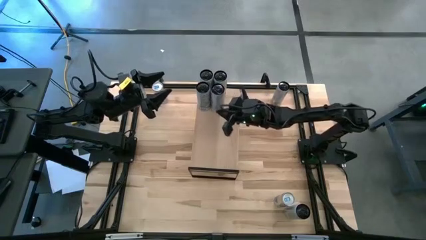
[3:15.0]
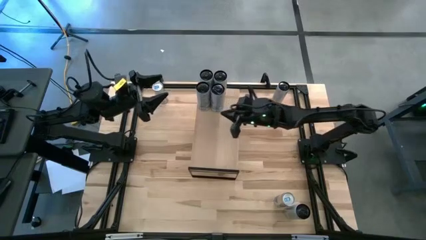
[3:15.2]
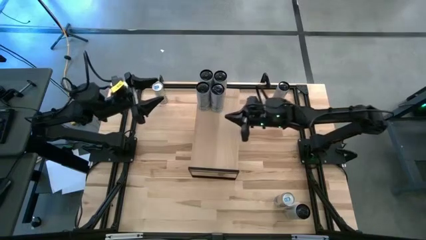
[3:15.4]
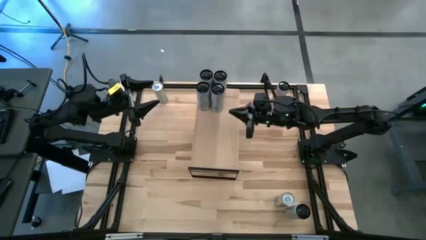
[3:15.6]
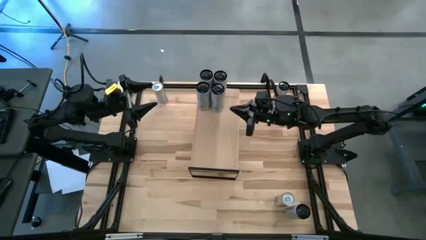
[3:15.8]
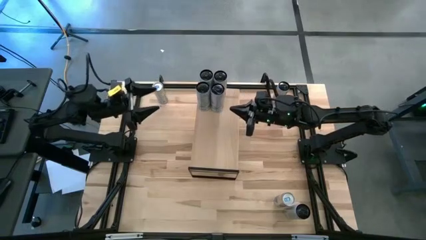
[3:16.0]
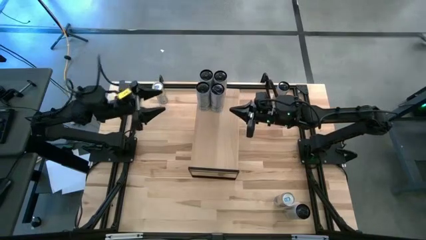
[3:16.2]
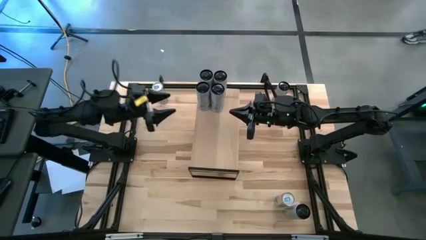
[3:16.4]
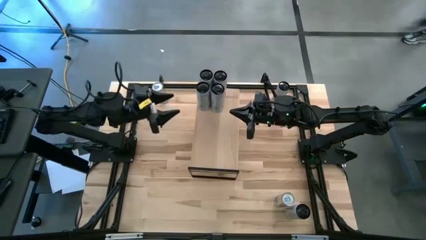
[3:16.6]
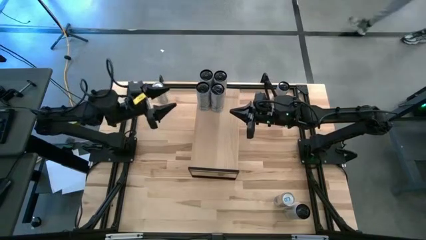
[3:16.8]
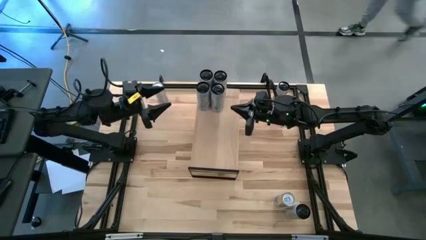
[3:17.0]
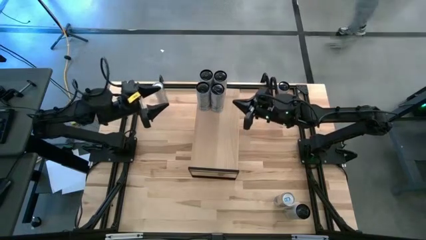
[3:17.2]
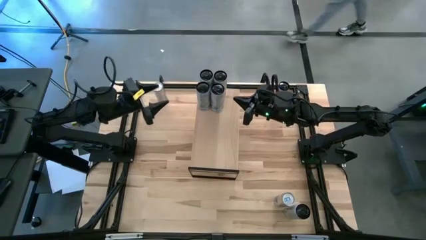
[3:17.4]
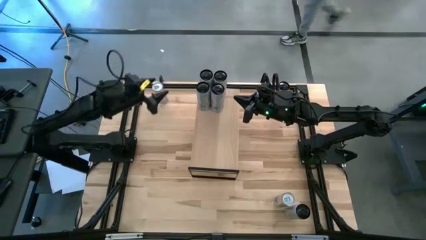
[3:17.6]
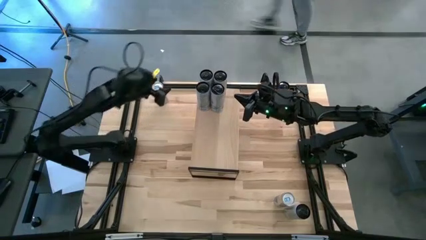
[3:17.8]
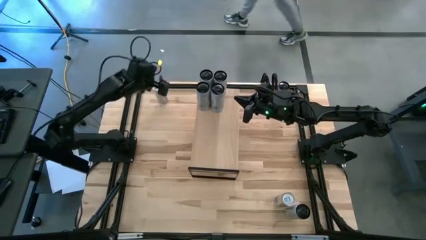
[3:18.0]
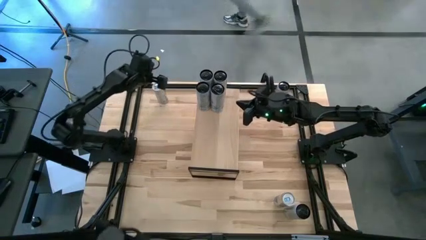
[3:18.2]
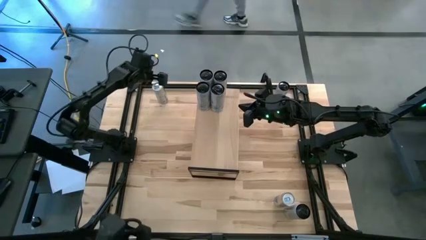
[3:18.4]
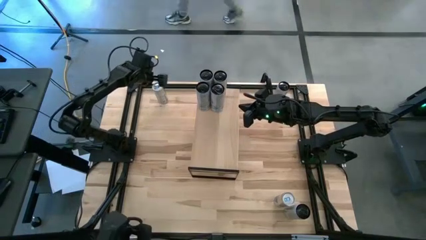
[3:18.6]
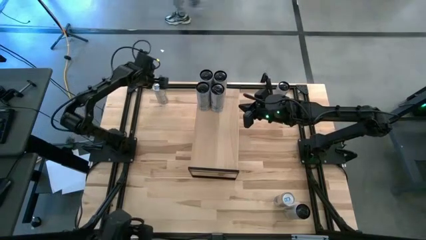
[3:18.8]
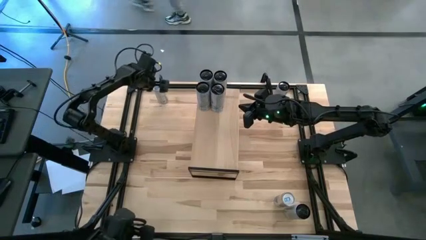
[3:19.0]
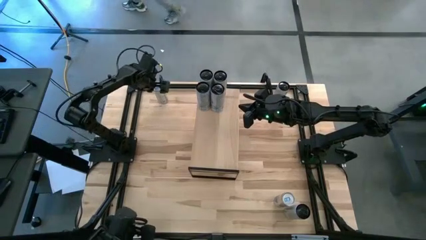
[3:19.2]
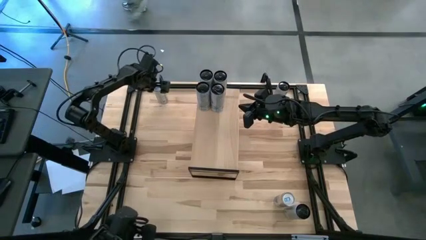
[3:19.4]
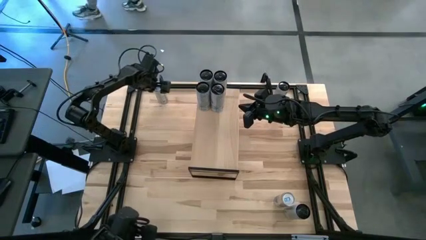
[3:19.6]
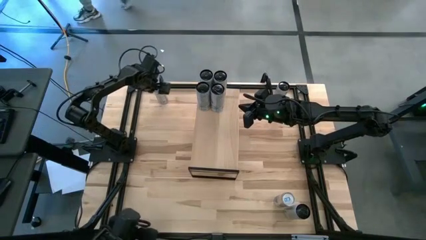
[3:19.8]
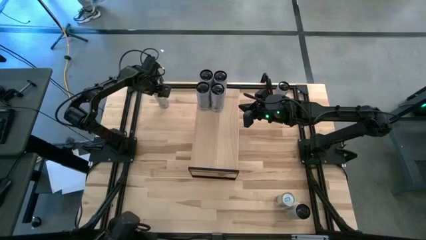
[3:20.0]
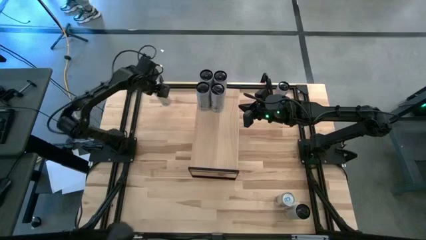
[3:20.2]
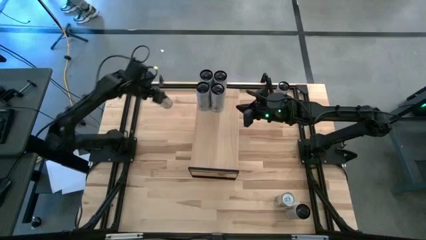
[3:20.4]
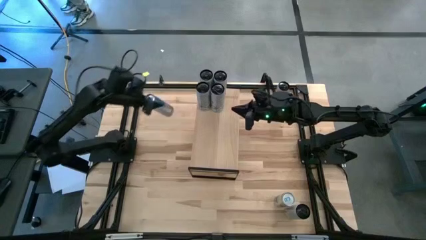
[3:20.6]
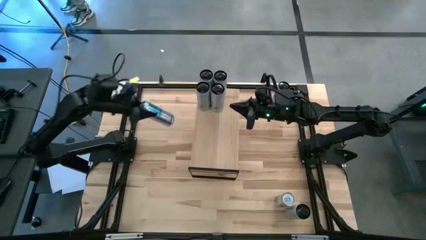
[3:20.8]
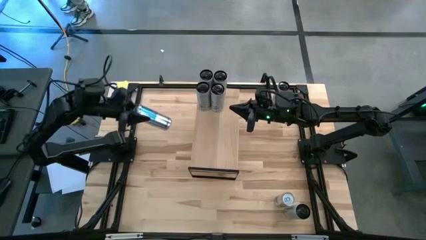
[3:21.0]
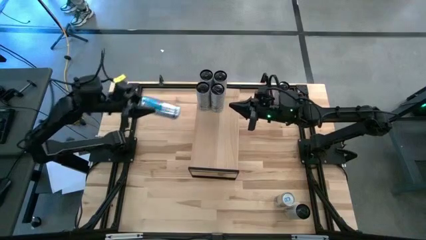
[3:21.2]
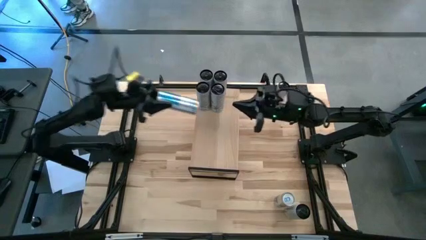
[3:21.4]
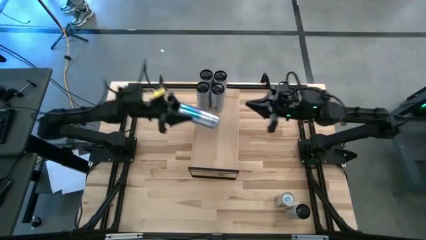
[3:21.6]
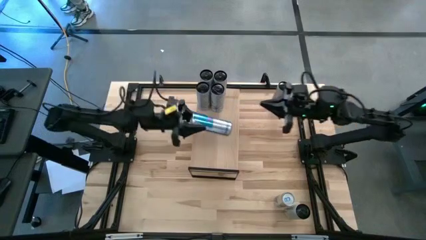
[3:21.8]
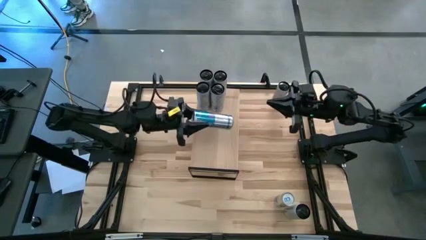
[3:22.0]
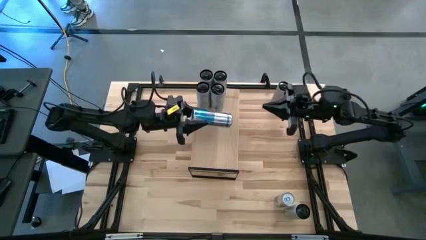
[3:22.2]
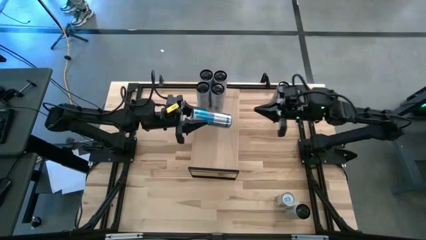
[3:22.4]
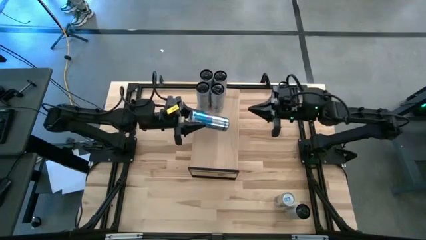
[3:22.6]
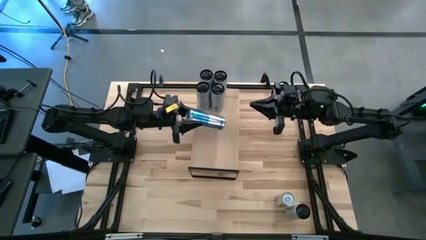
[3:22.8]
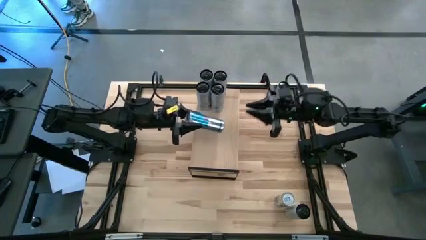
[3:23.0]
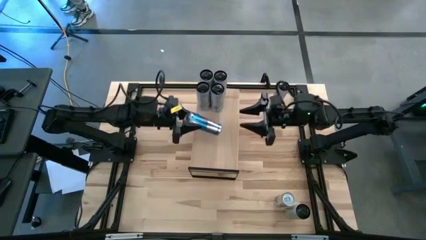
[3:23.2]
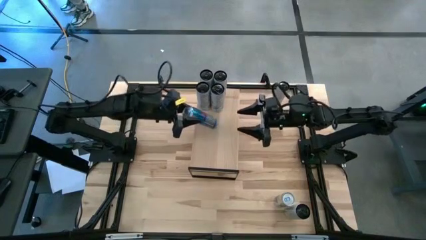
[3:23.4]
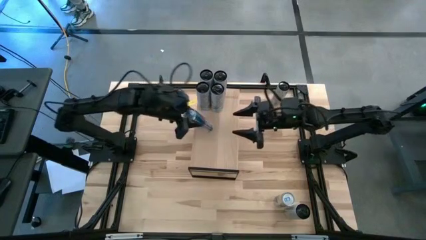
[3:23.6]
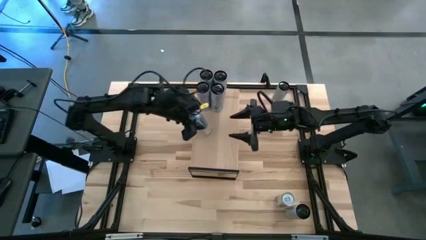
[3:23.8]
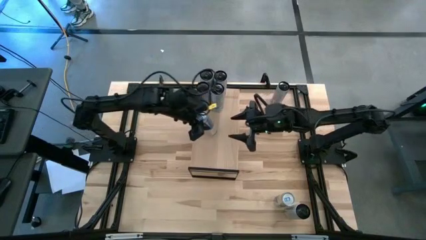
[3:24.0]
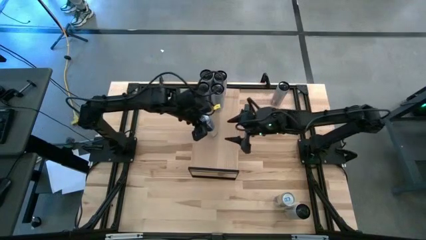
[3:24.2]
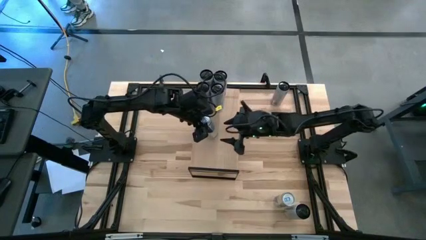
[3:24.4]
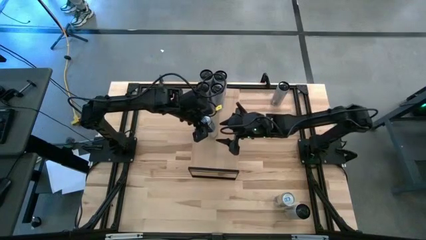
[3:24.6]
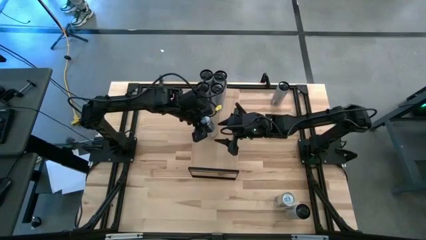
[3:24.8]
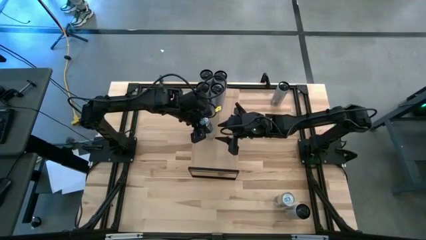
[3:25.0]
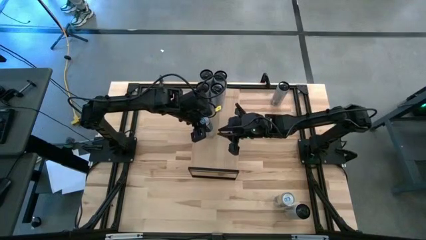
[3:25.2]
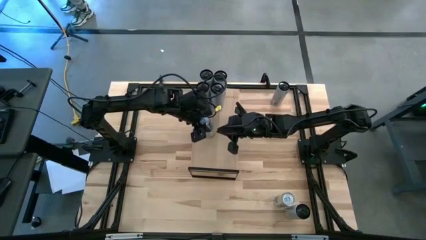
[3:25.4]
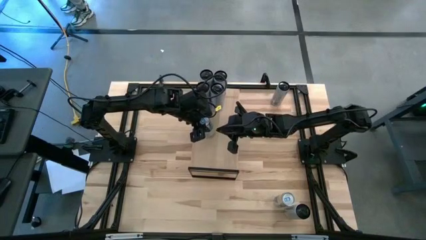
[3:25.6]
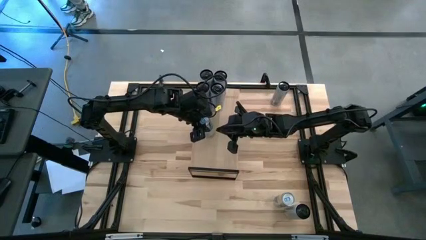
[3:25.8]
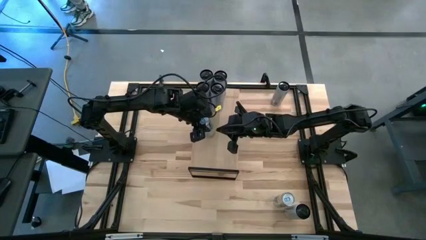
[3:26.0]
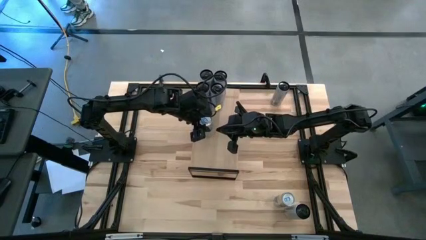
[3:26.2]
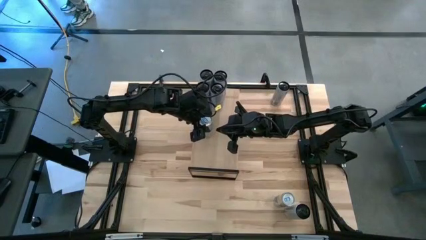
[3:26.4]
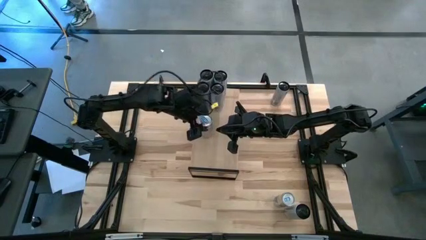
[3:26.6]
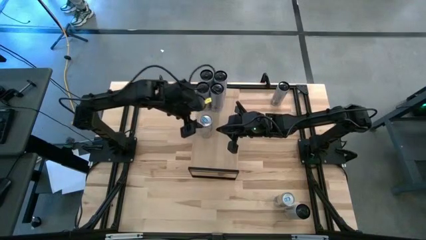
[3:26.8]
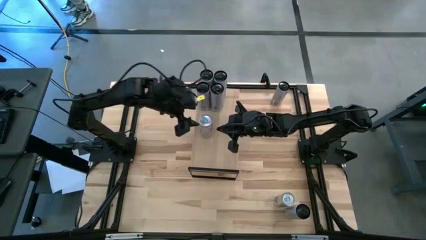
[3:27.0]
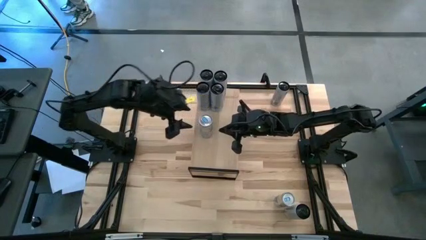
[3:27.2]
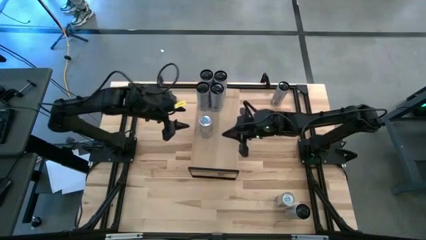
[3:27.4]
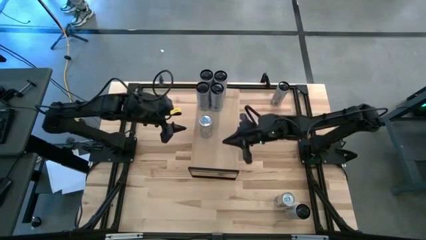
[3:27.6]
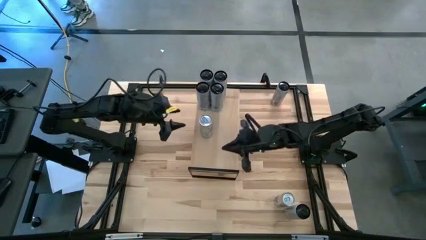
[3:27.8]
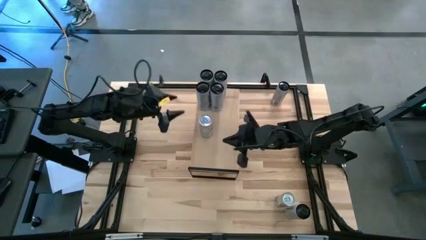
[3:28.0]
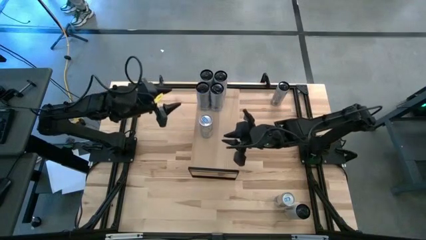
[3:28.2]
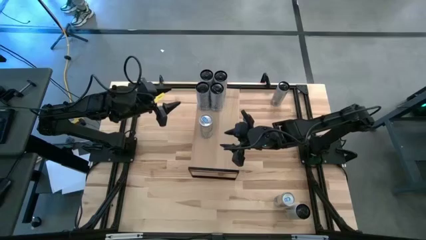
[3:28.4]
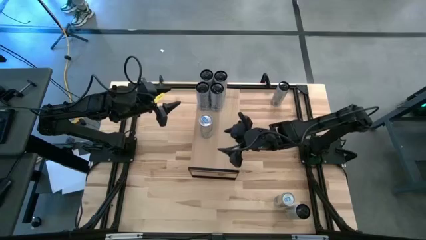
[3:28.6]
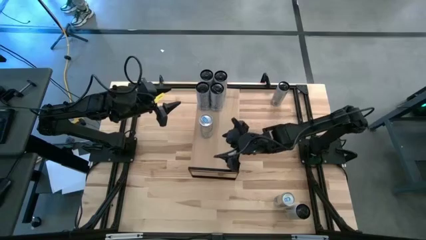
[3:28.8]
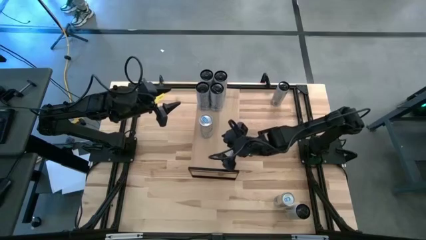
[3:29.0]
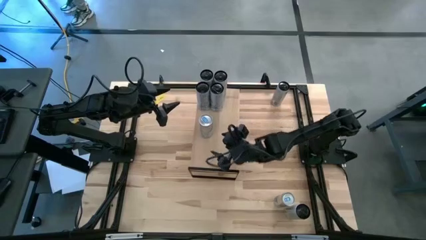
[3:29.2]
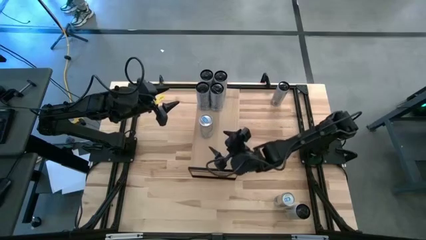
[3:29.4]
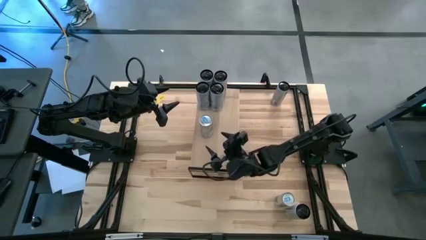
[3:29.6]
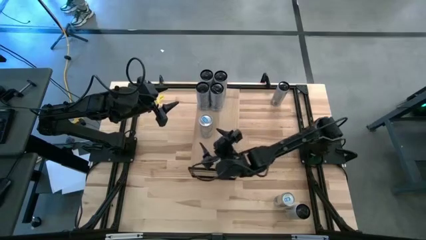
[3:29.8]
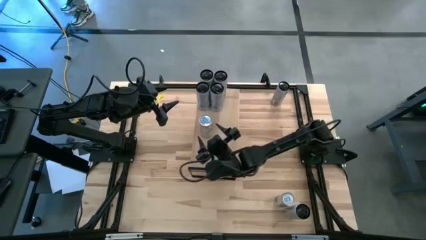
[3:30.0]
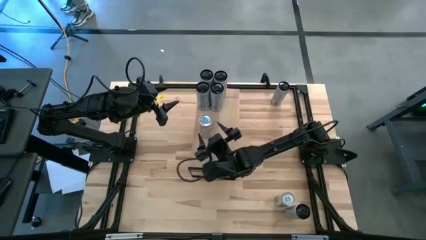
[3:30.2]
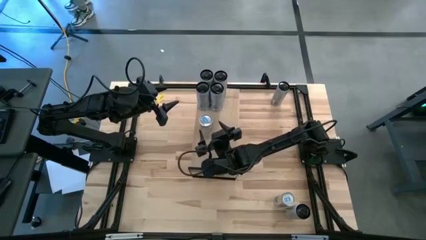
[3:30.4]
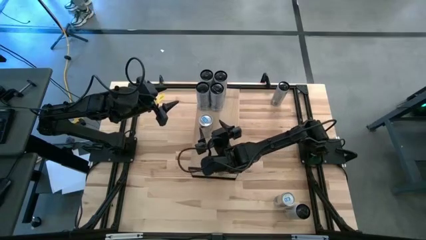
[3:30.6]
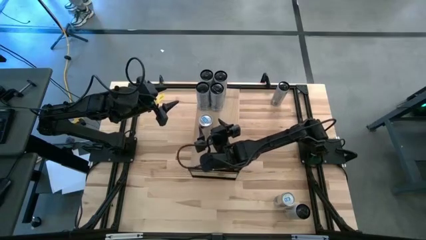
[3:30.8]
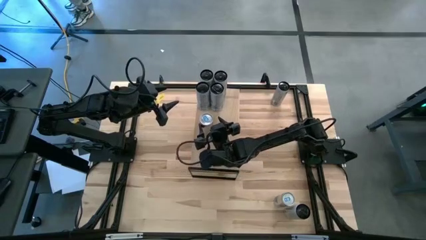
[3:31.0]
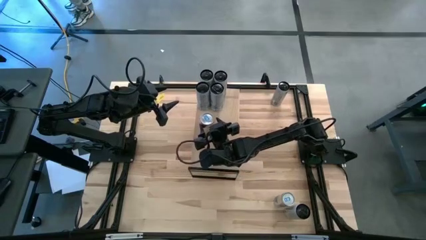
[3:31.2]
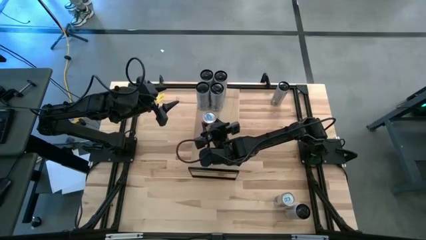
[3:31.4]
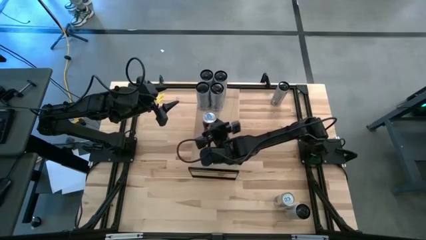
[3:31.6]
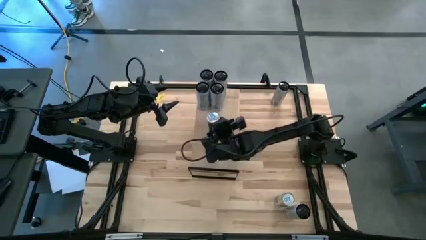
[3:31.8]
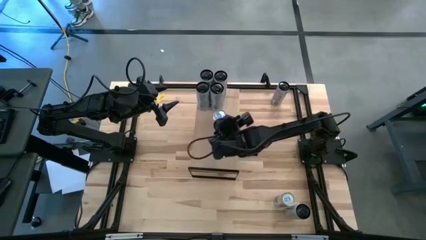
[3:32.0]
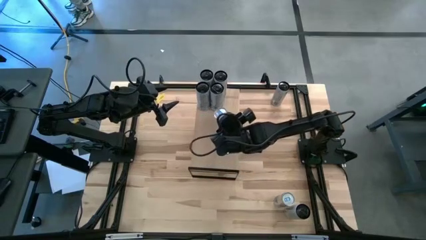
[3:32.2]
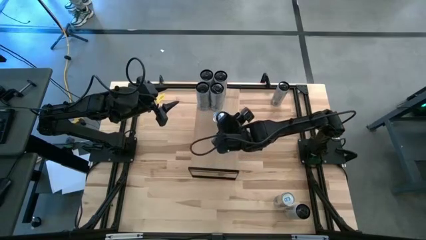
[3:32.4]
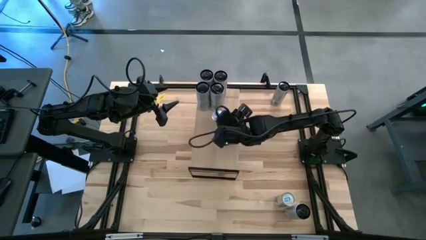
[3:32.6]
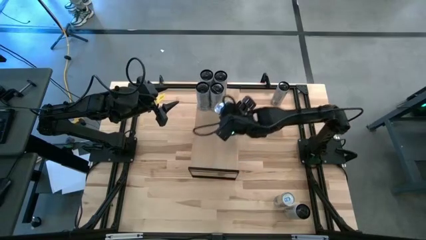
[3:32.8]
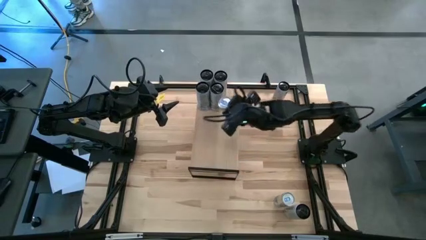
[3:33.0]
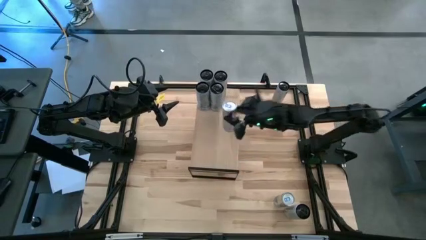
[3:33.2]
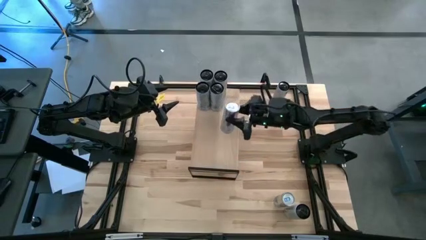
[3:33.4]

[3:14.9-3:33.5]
Task: Place canned beverage on shelf
Put the top blue soda can on the shelf
